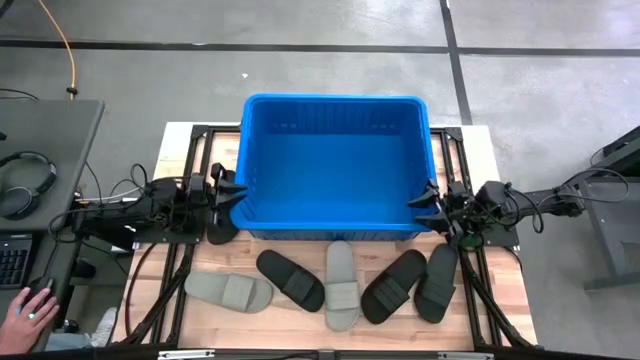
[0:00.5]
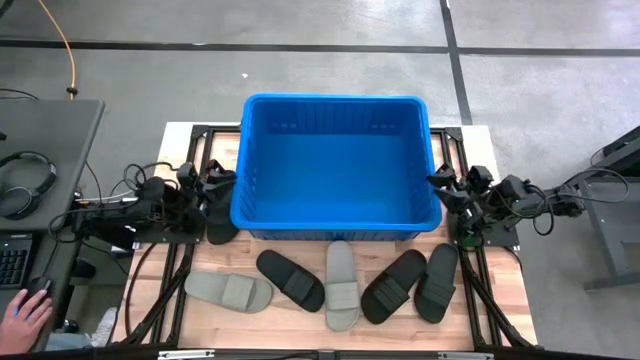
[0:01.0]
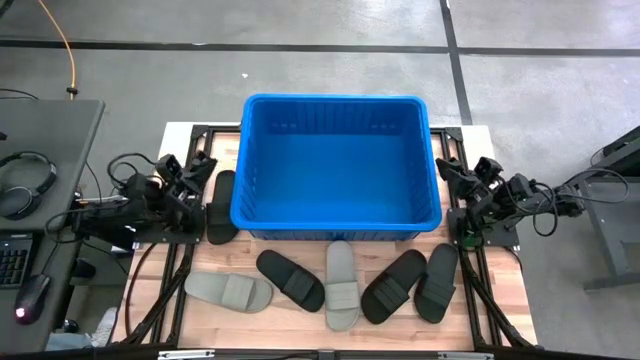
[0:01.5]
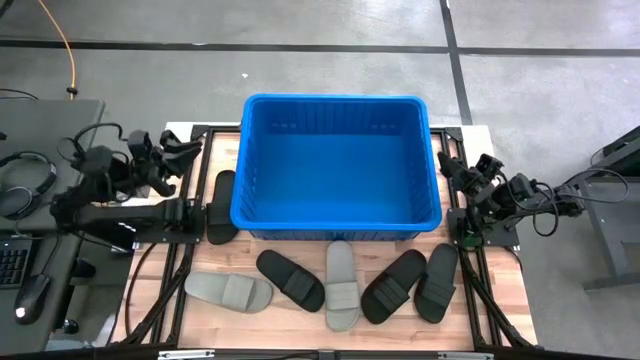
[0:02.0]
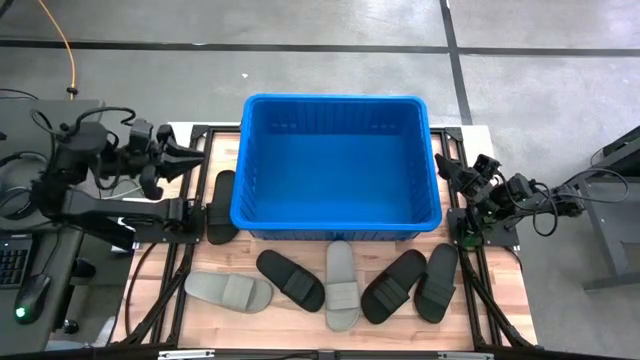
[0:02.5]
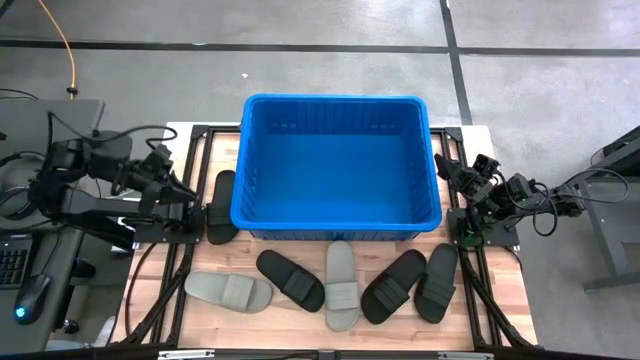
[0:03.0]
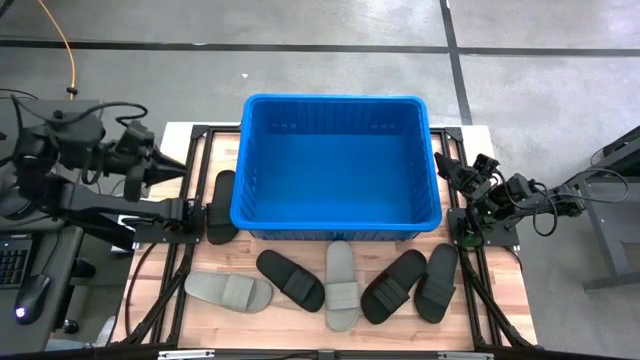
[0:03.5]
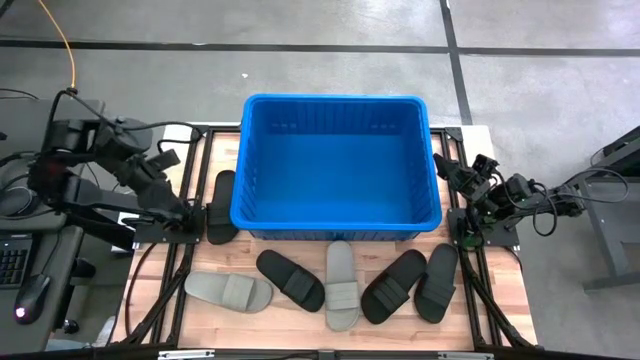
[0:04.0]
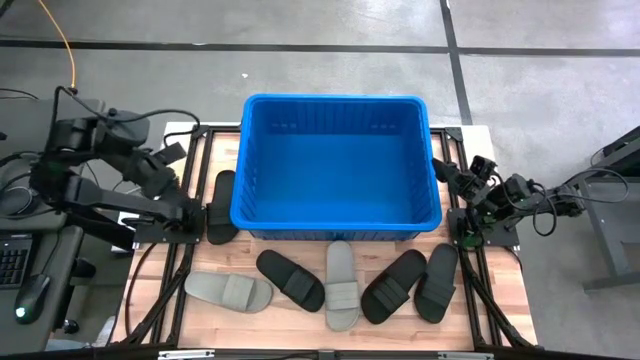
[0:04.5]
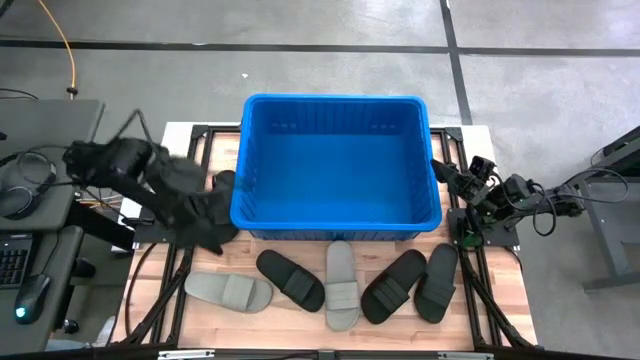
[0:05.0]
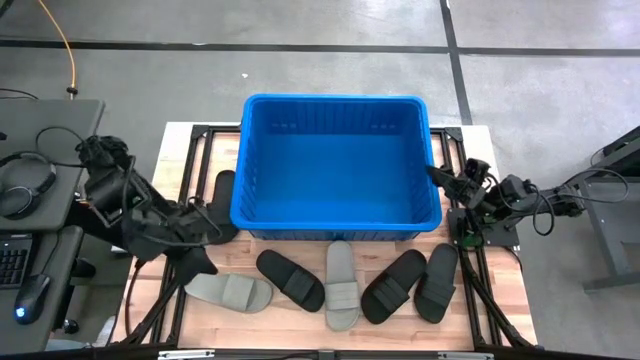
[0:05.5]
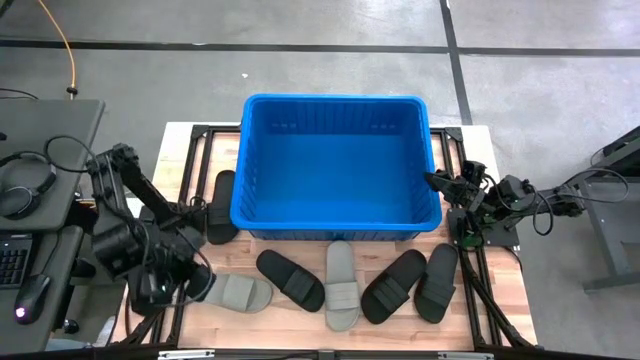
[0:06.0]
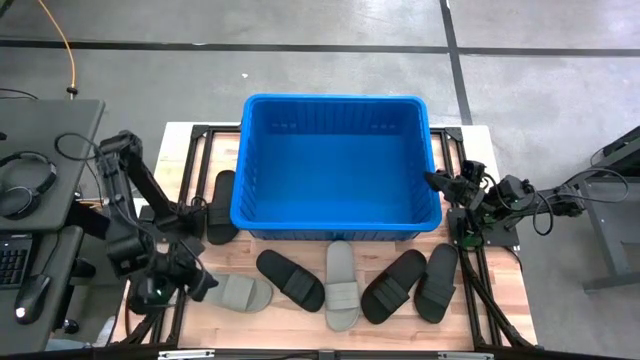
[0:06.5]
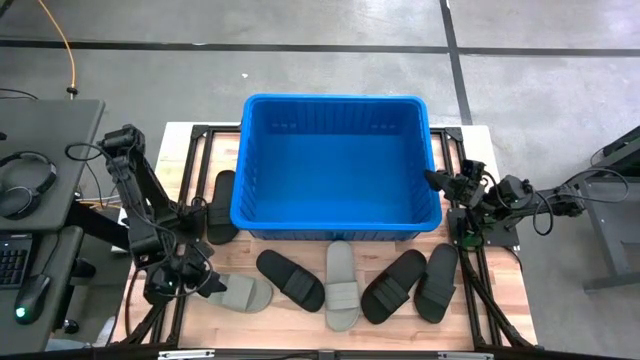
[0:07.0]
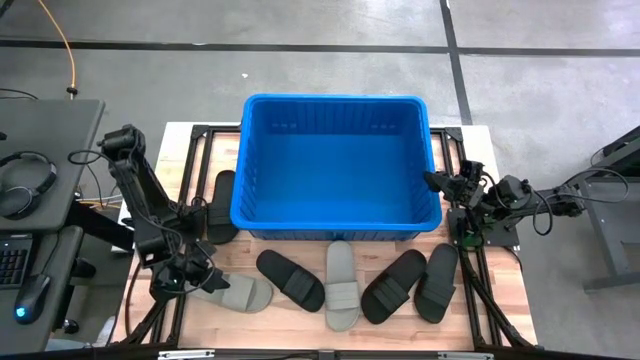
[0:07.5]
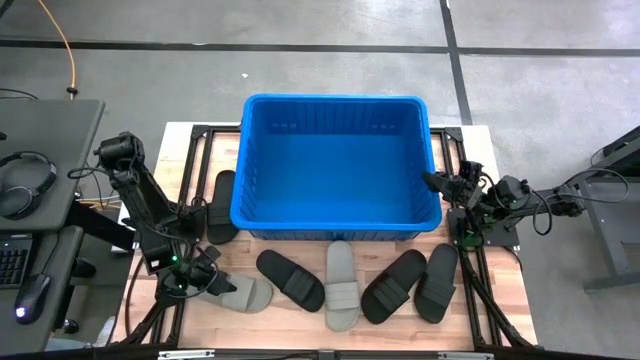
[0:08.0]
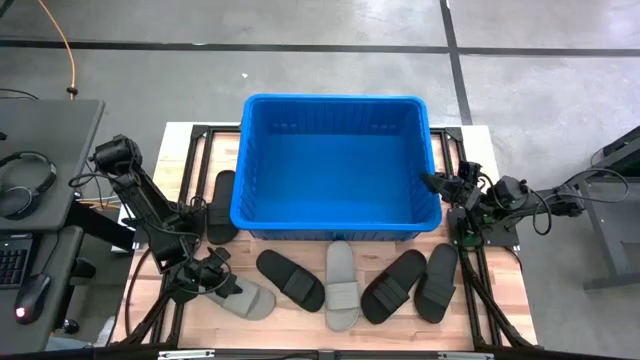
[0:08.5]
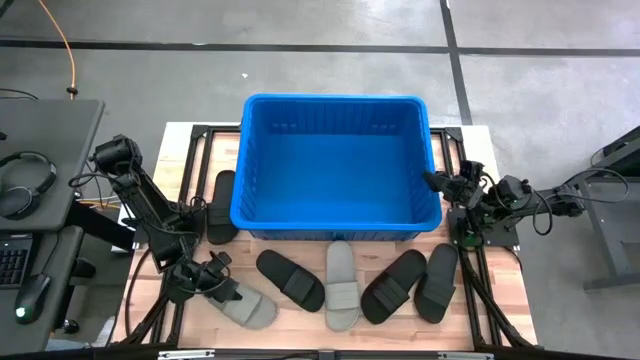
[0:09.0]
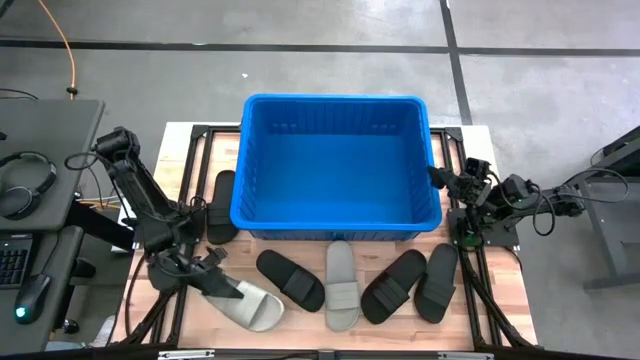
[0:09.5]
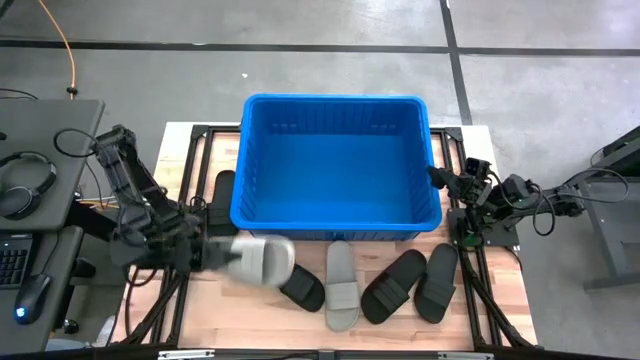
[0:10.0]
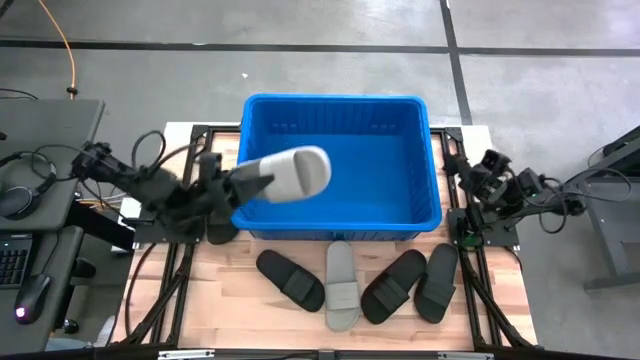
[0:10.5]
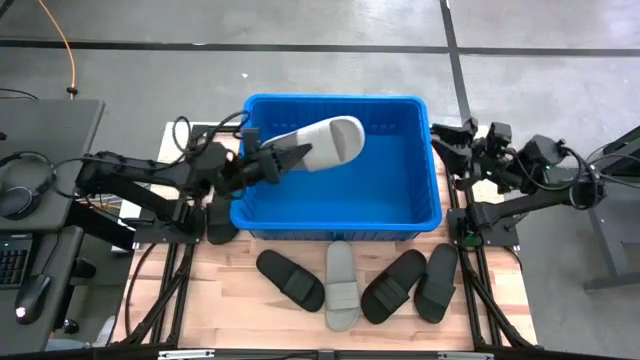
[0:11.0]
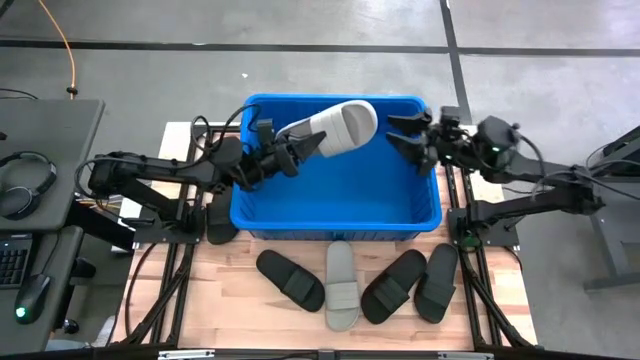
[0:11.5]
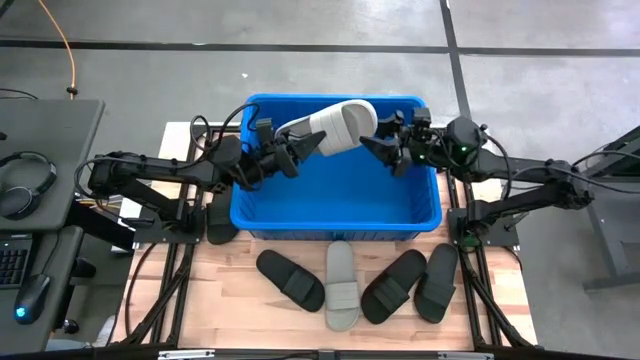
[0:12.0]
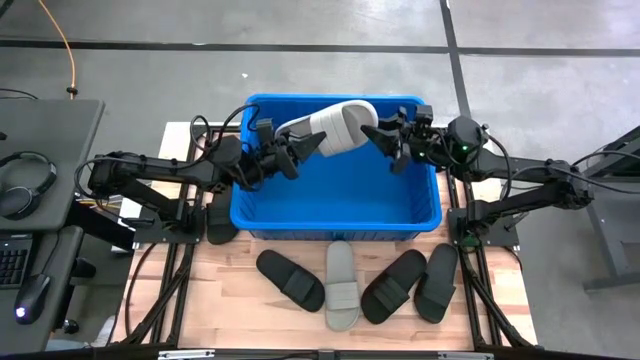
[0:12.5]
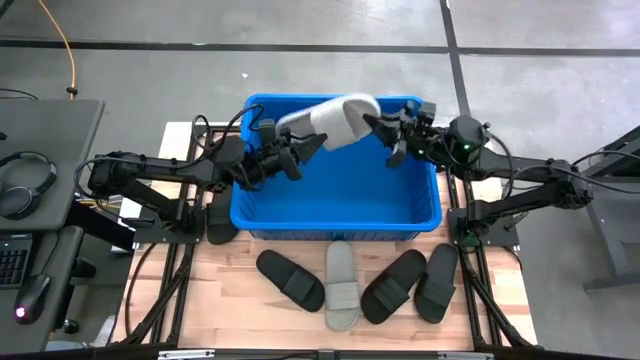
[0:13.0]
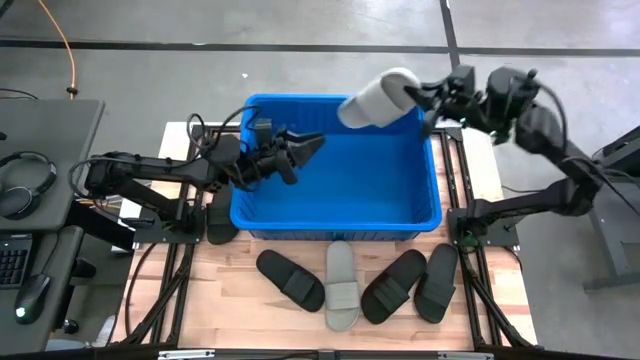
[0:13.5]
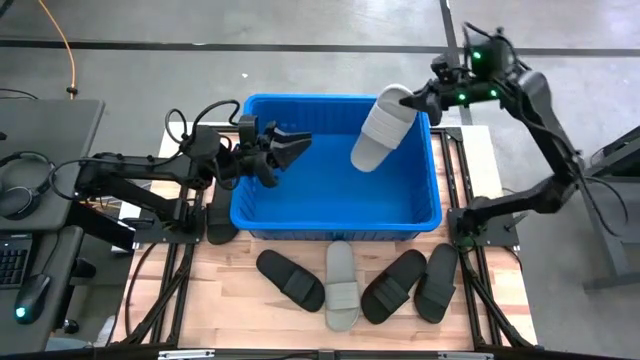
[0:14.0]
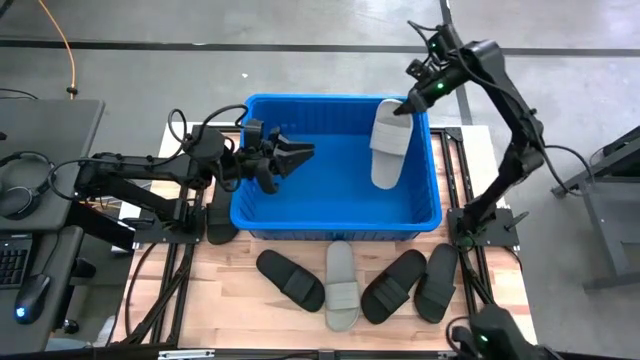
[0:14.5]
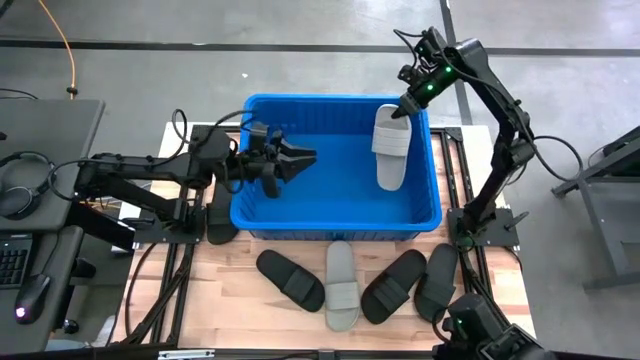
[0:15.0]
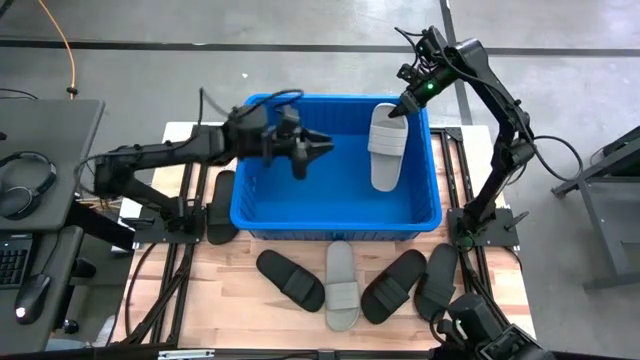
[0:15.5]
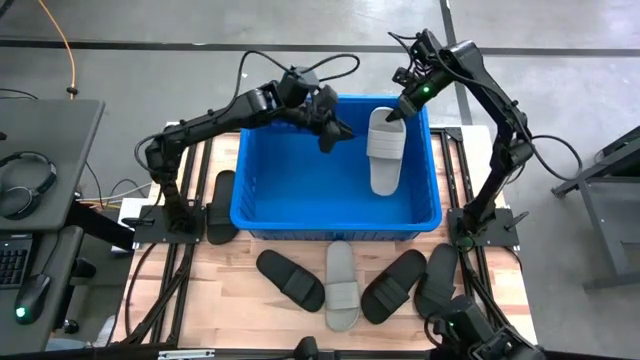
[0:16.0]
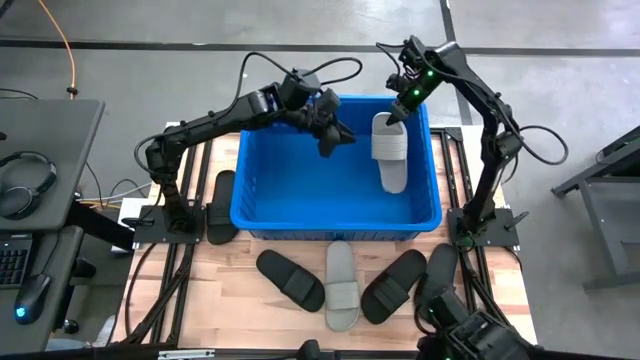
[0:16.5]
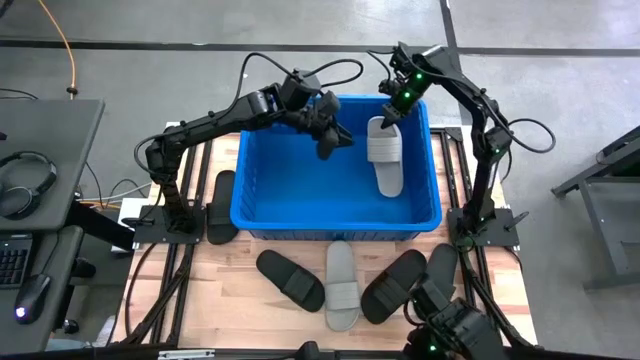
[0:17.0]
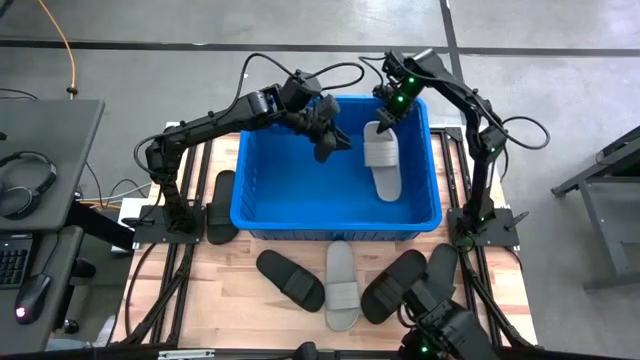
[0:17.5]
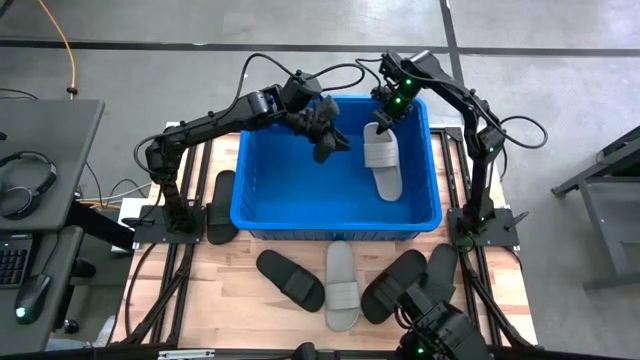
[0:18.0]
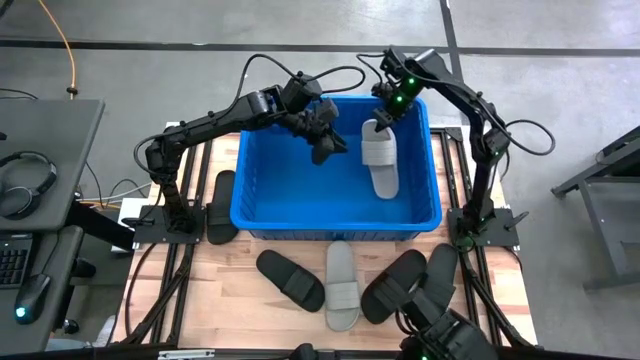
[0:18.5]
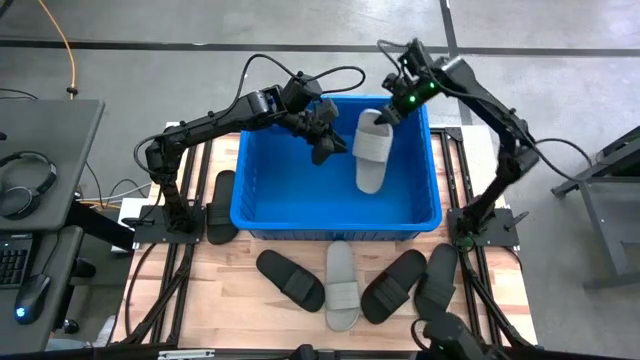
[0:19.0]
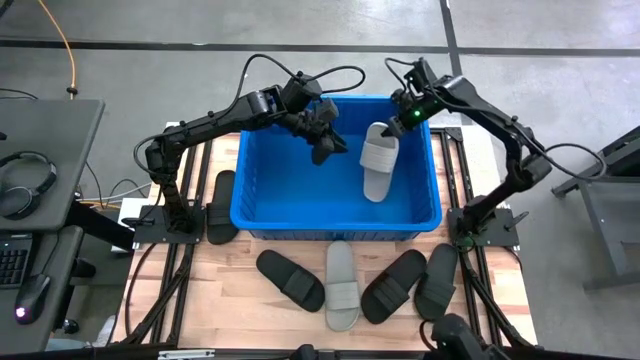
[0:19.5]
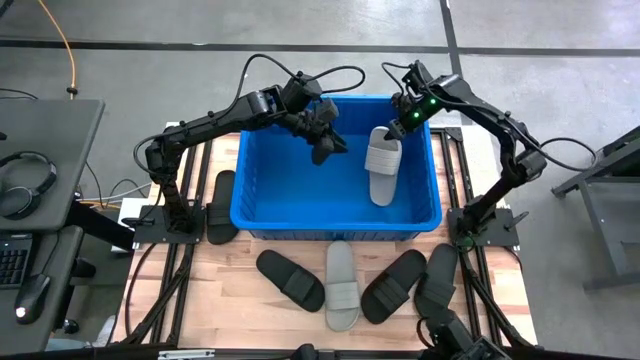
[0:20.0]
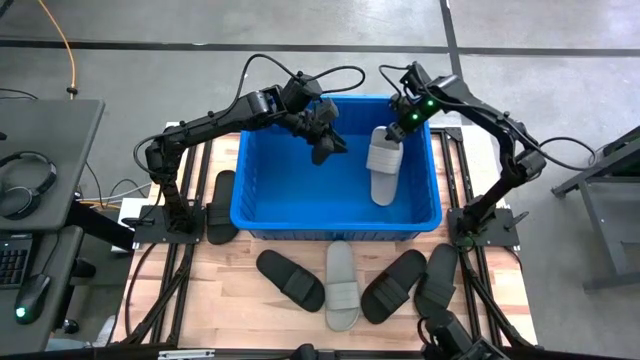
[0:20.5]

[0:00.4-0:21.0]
Task: Pick and place slides into bin
Put the left gray slide into the blue bin
